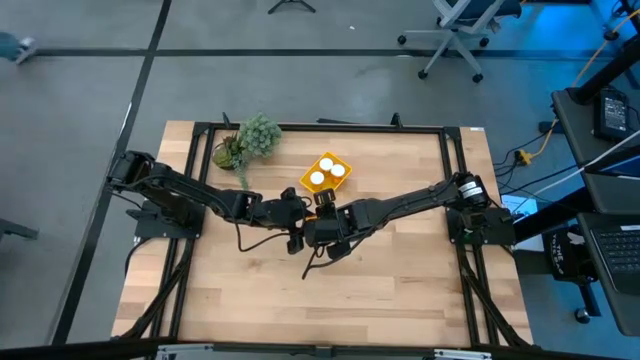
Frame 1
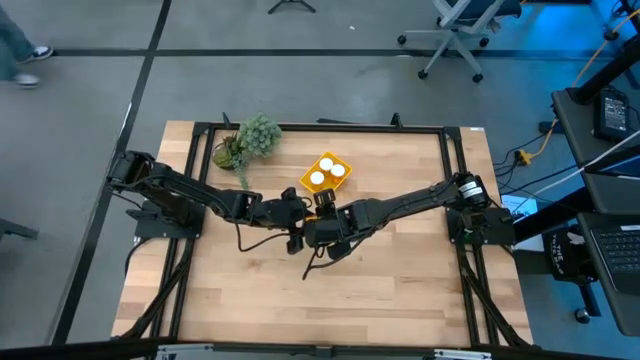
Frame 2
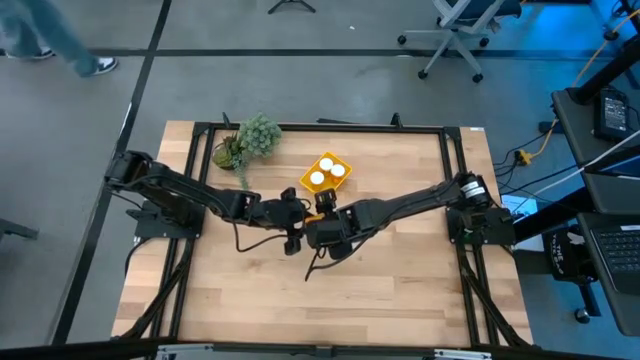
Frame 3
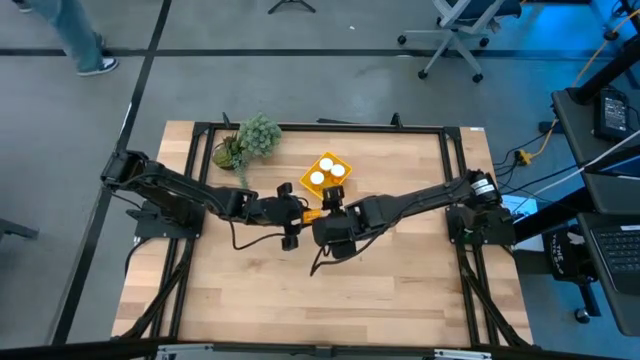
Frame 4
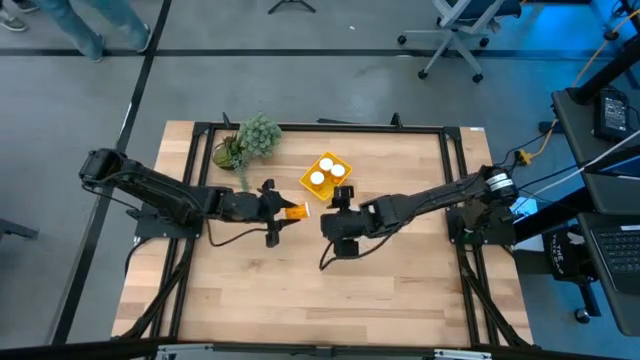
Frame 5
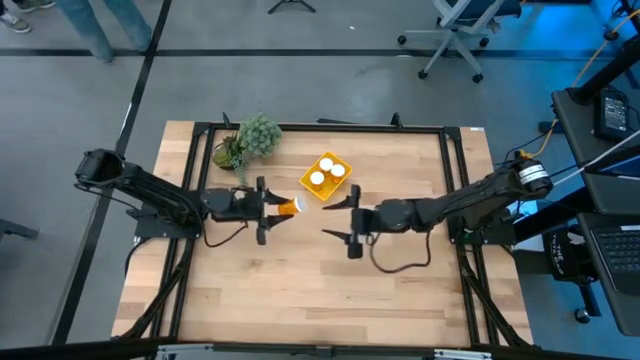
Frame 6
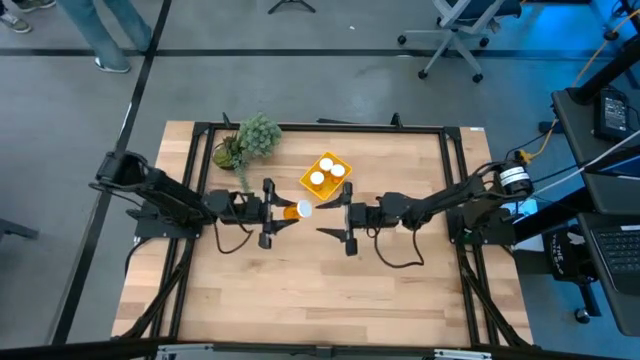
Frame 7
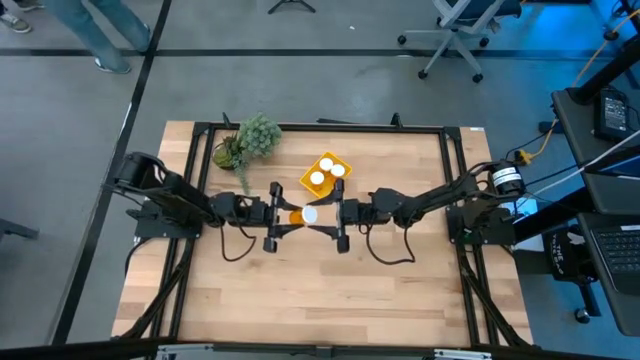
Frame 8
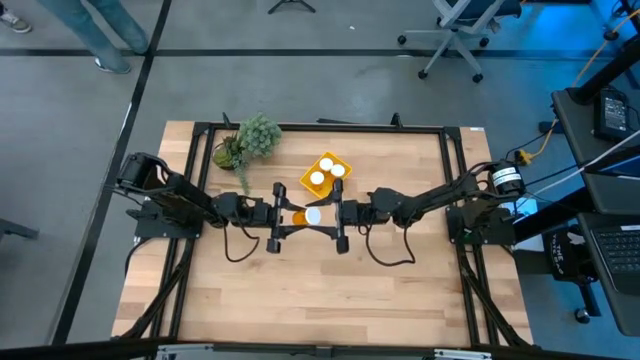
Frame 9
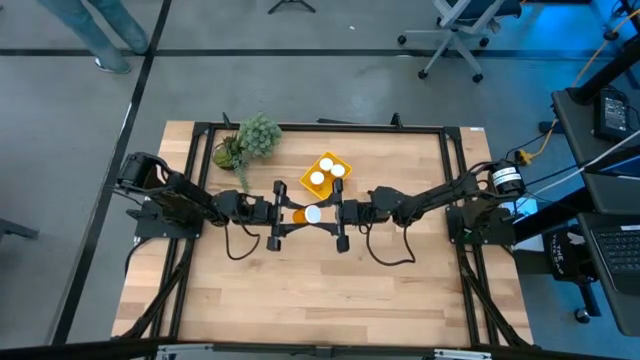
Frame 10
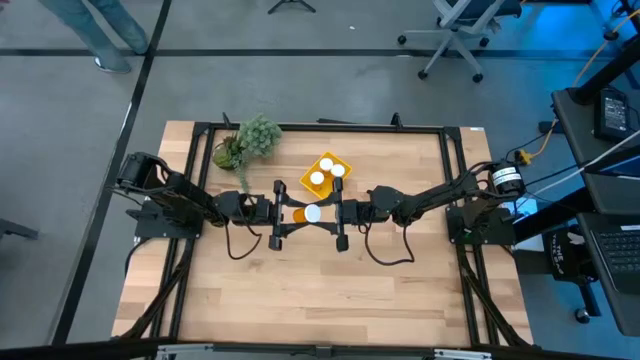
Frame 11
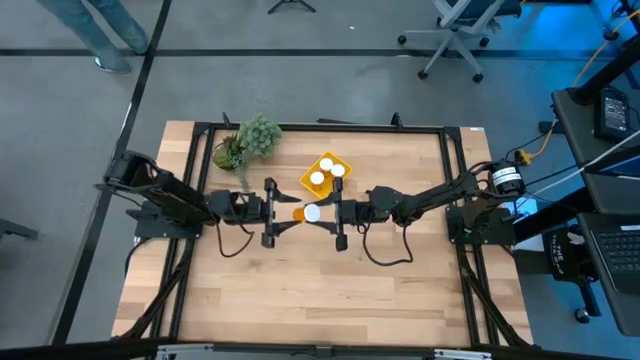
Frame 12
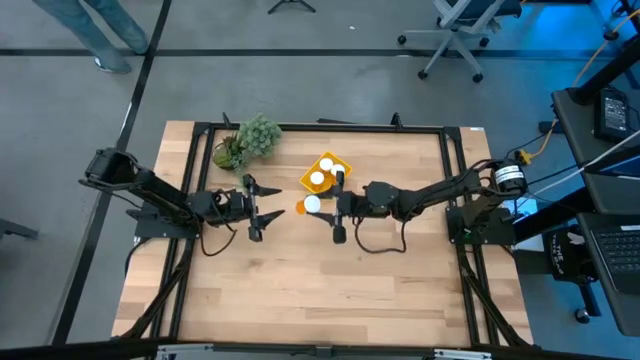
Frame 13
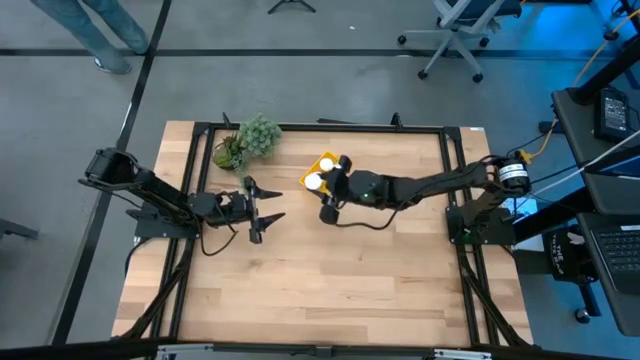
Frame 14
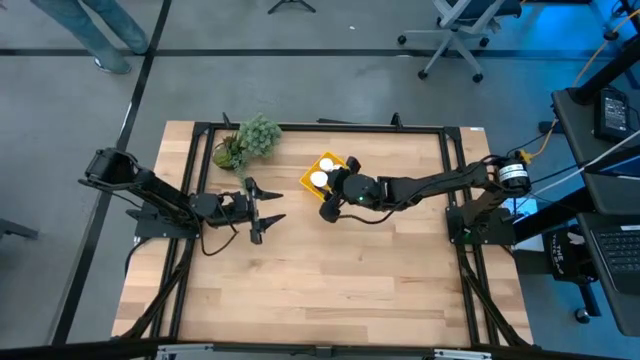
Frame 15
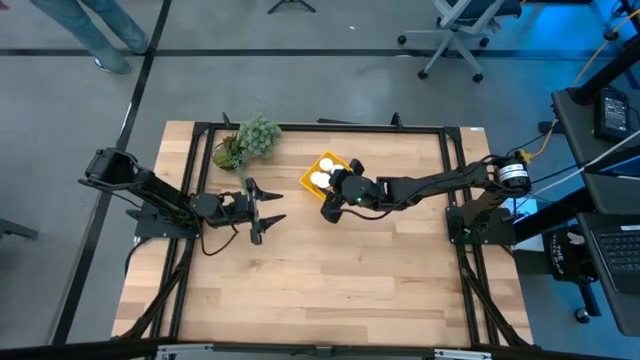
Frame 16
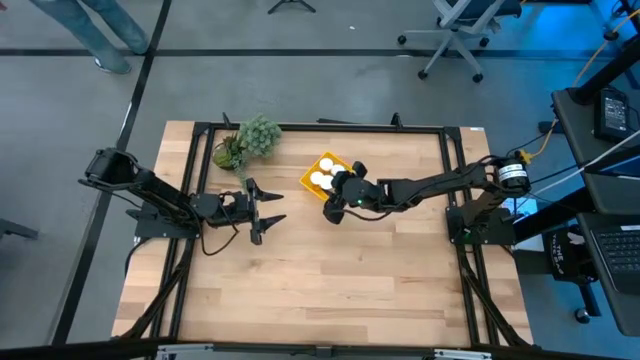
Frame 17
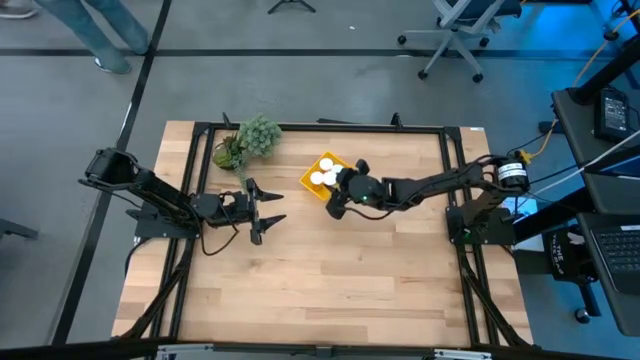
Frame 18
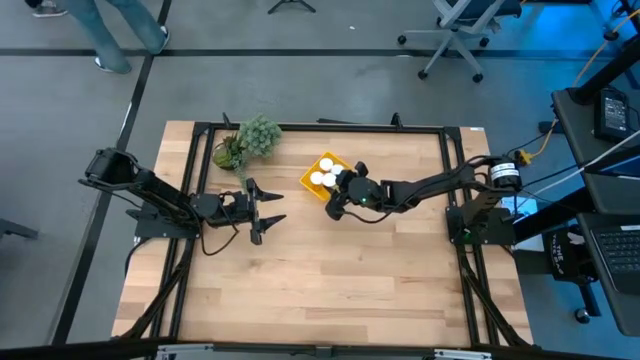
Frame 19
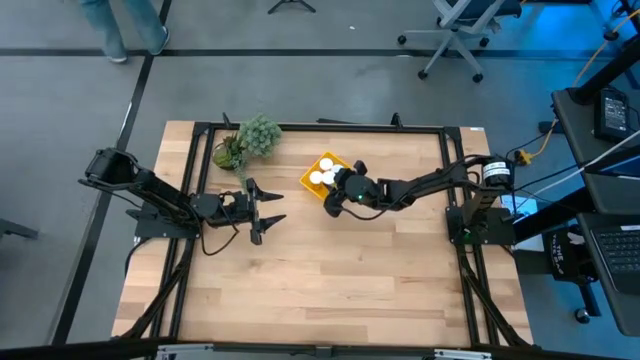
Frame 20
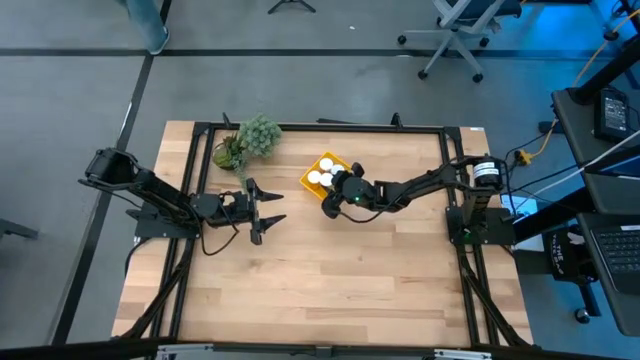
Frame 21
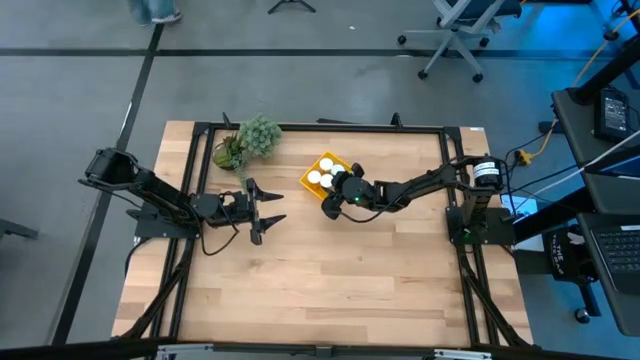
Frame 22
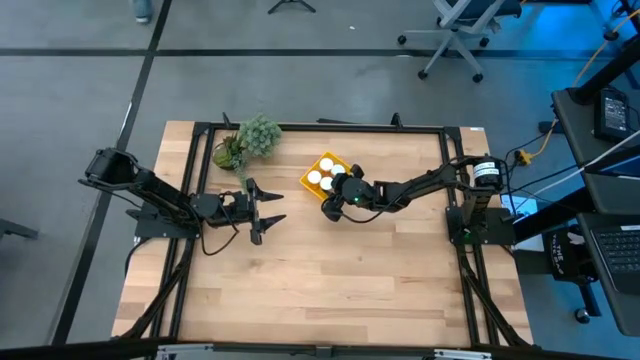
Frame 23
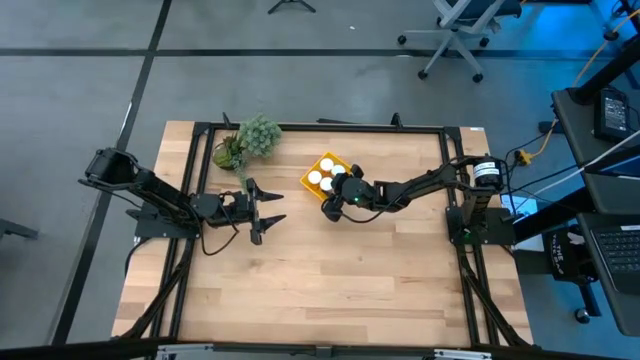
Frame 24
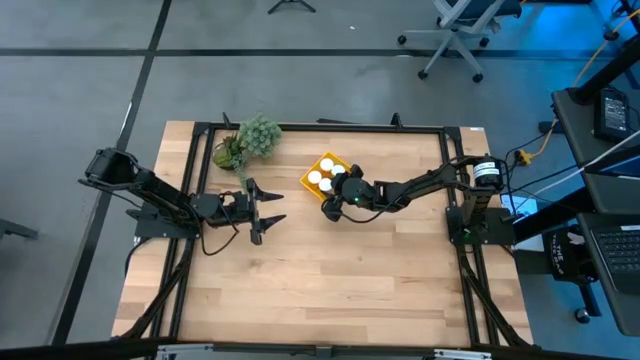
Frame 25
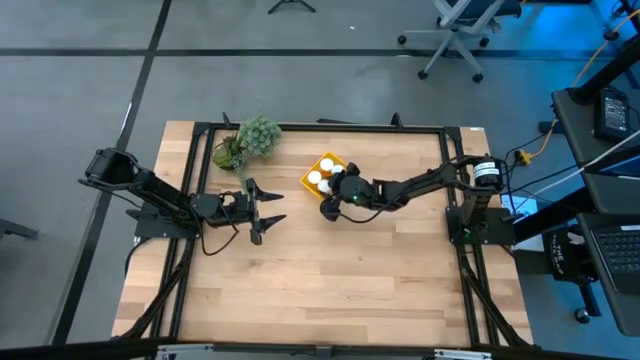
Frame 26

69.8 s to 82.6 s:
Task: Pick and place pill bottles into a basket
Put the orange pill bottle into the yellow bin

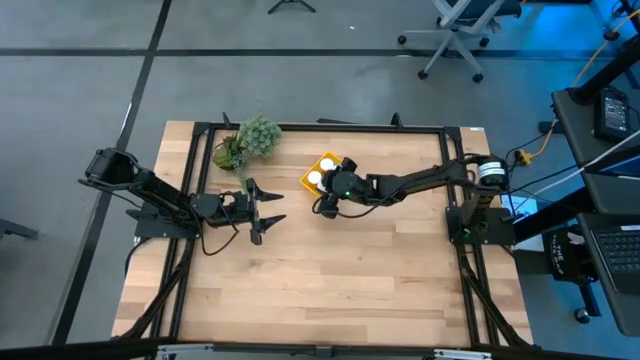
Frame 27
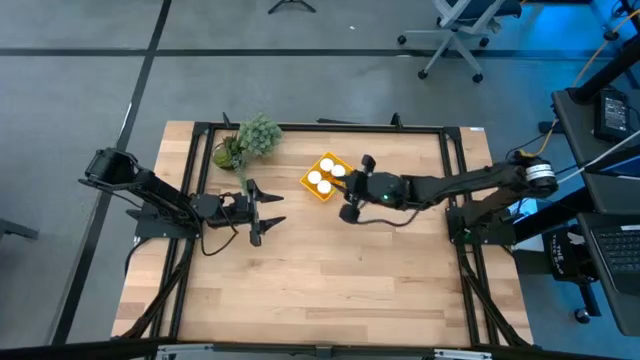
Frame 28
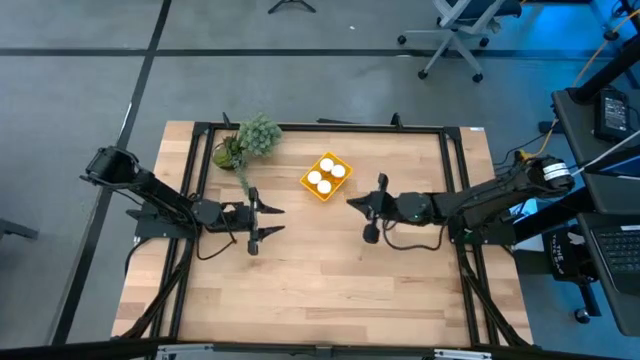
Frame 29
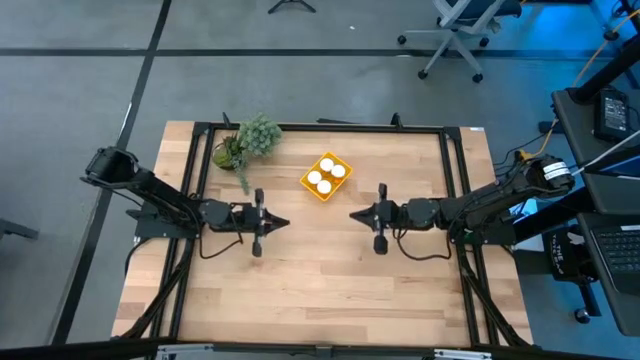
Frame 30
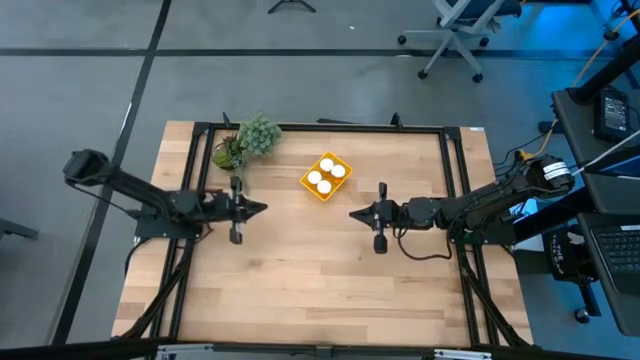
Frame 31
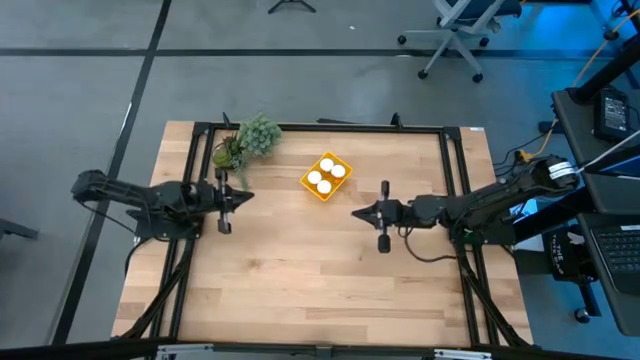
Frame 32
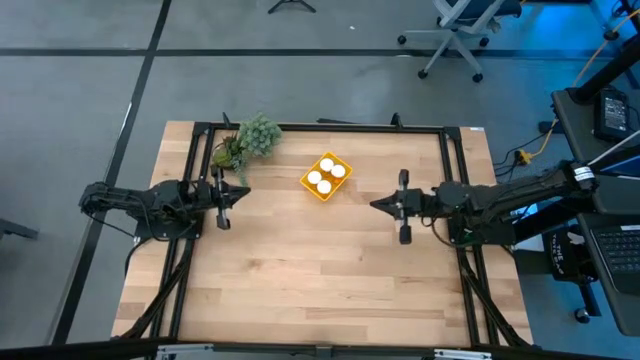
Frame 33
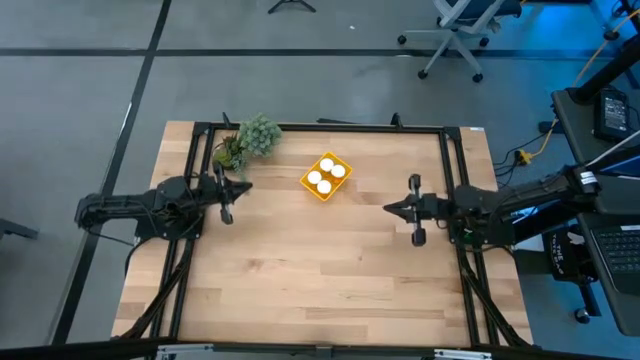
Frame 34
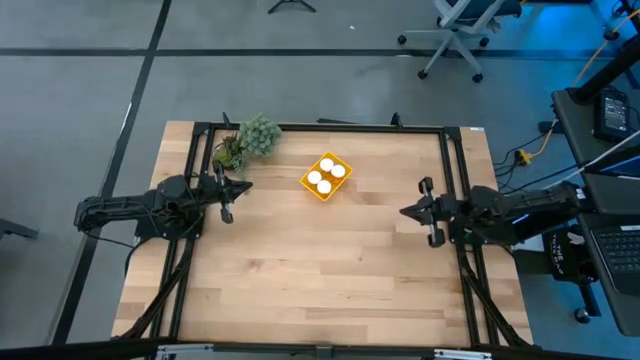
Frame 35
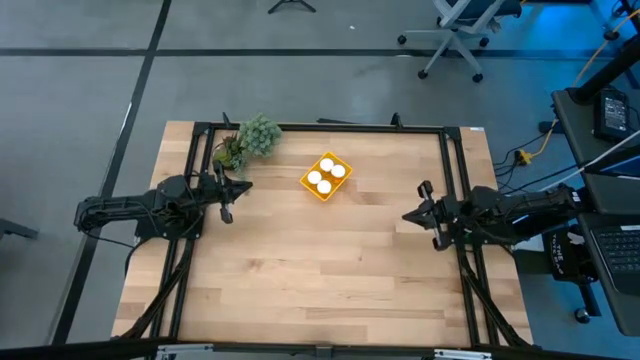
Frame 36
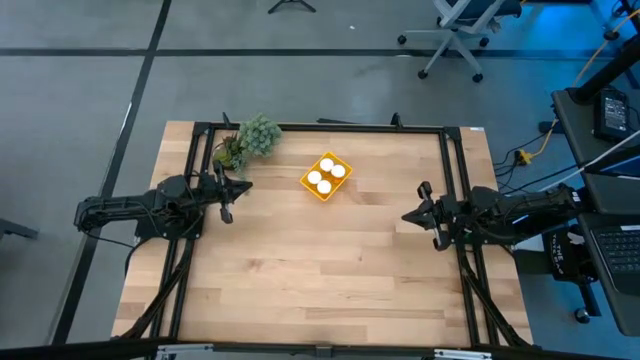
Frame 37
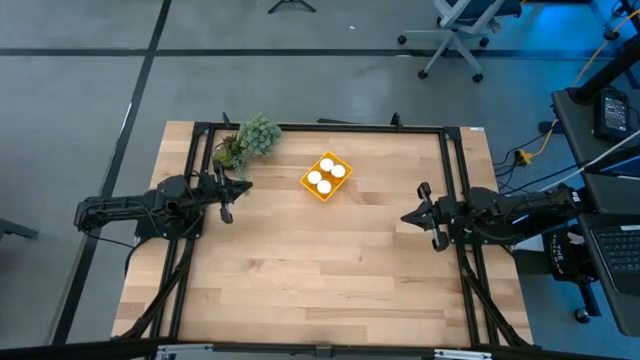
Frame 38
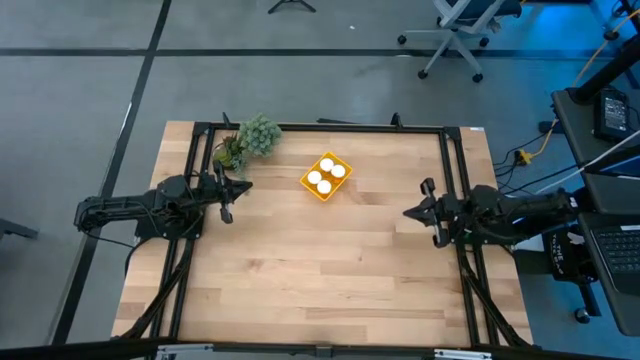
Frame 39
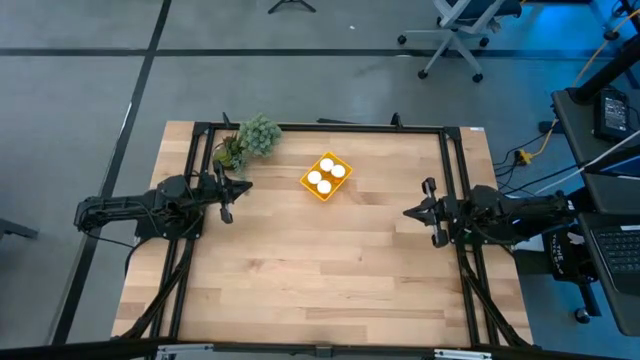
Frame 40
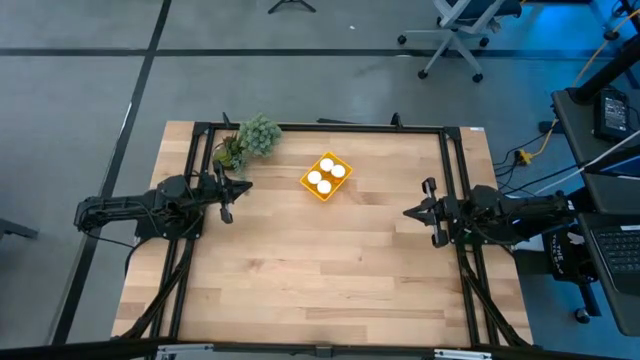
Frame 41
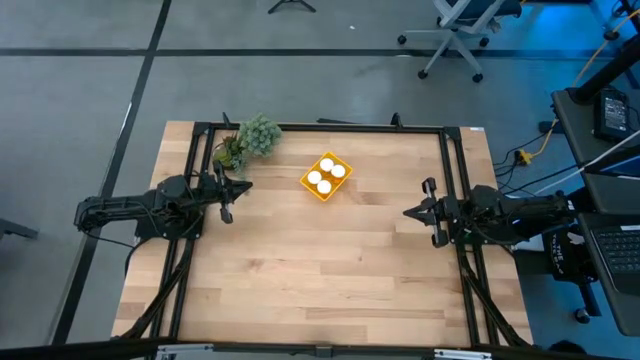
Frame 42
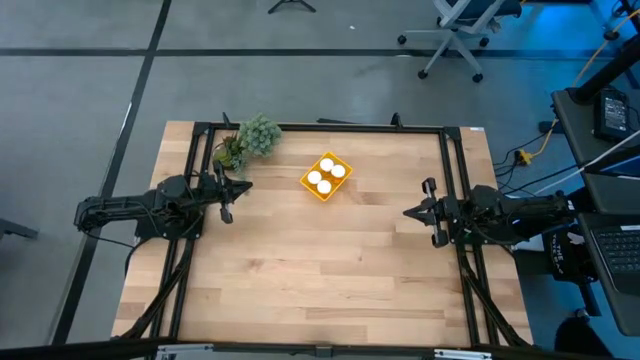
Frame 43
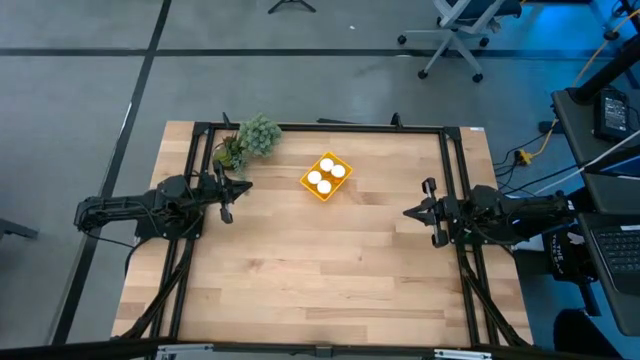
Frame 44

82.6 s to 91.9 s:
Return to Home Position
